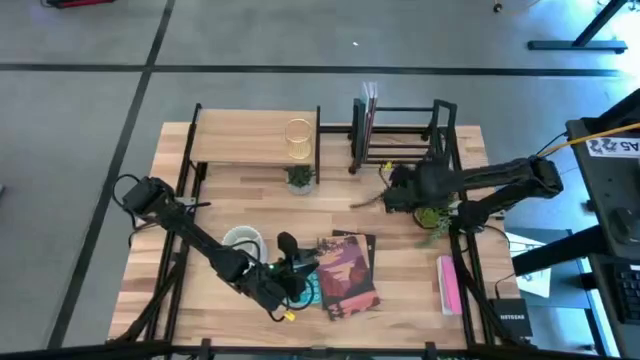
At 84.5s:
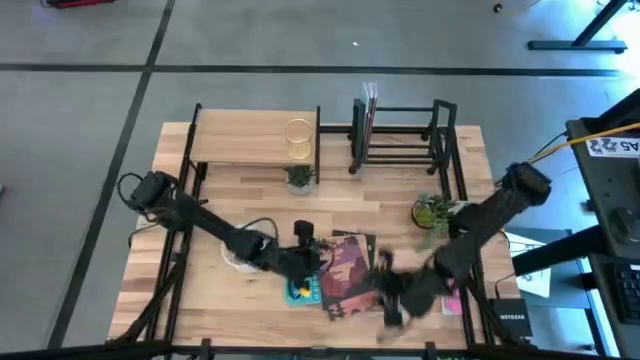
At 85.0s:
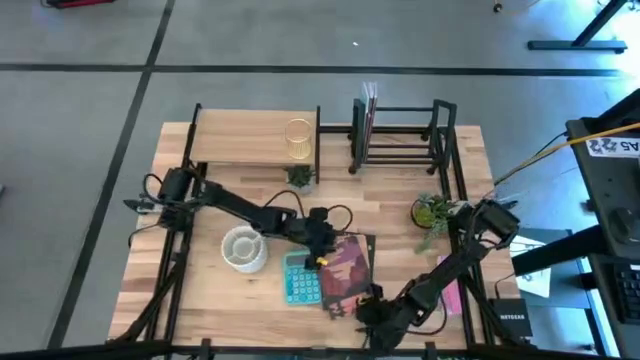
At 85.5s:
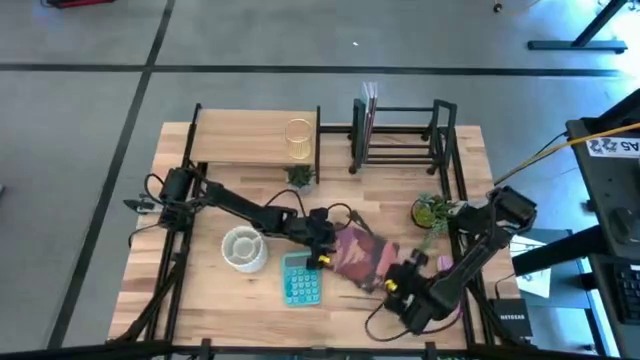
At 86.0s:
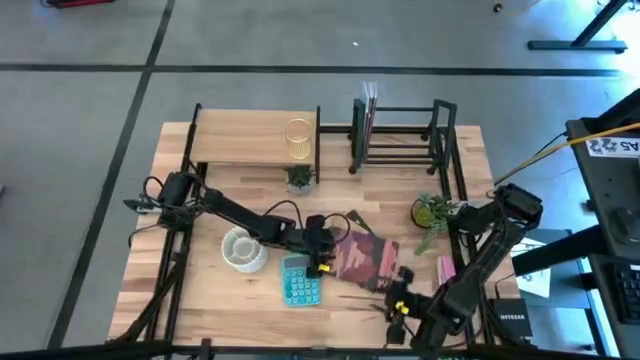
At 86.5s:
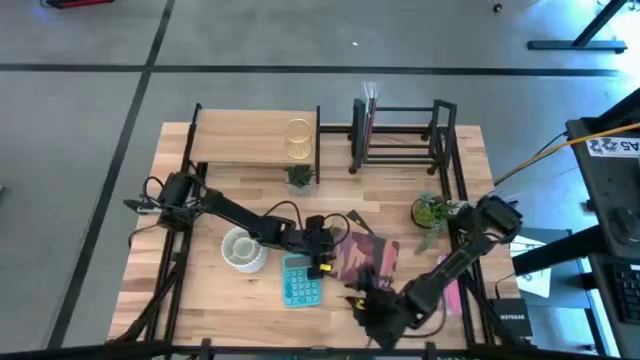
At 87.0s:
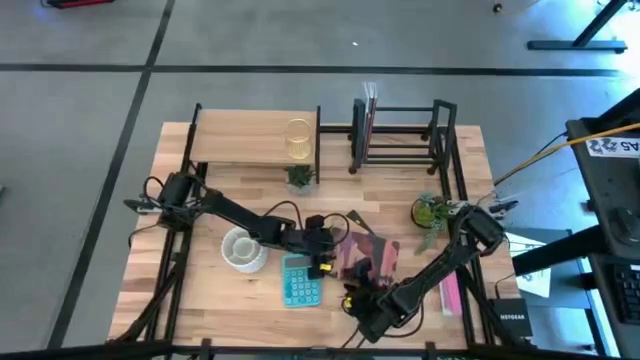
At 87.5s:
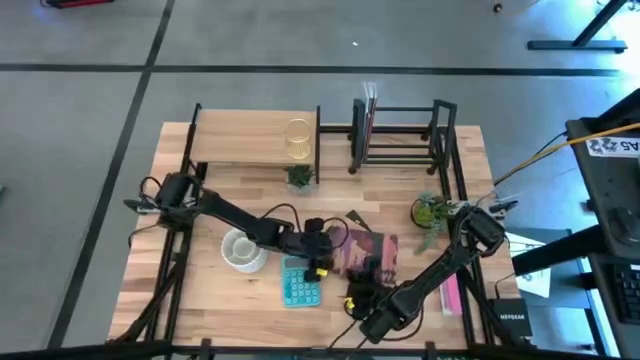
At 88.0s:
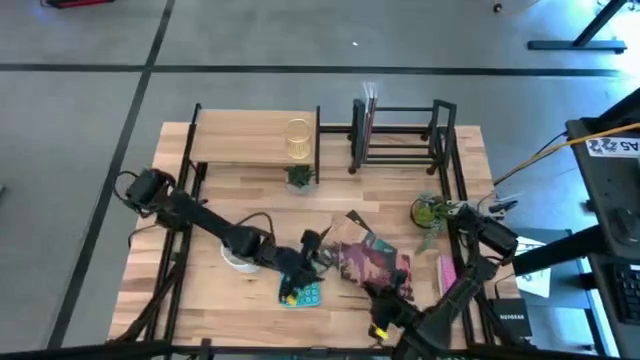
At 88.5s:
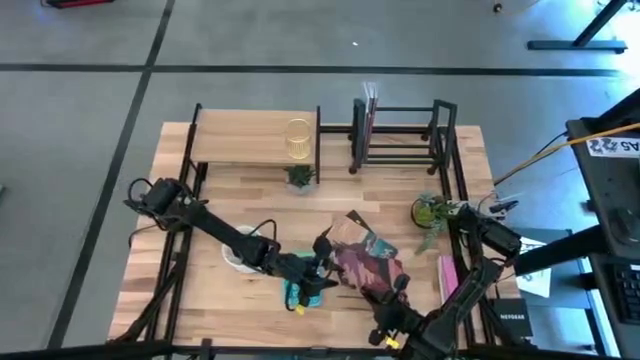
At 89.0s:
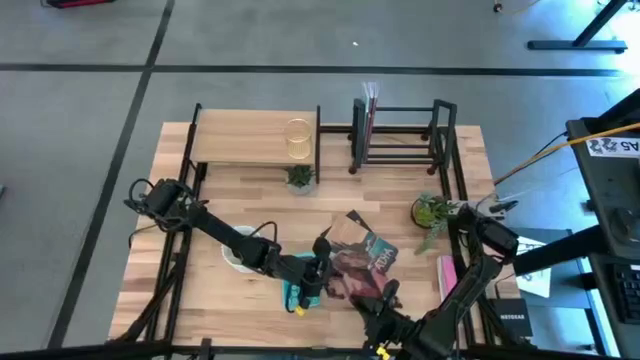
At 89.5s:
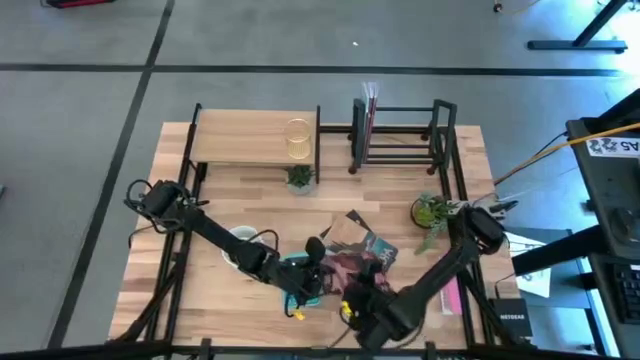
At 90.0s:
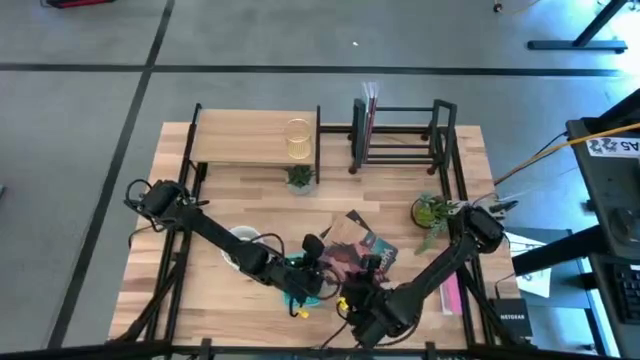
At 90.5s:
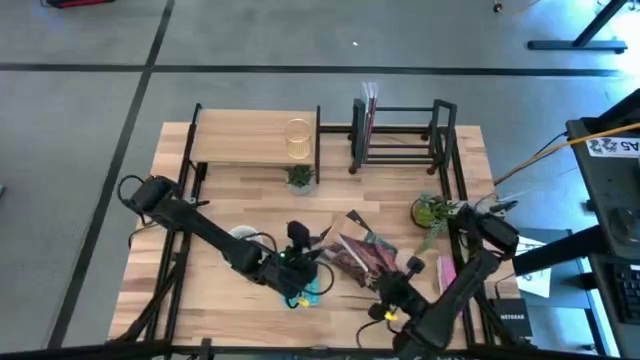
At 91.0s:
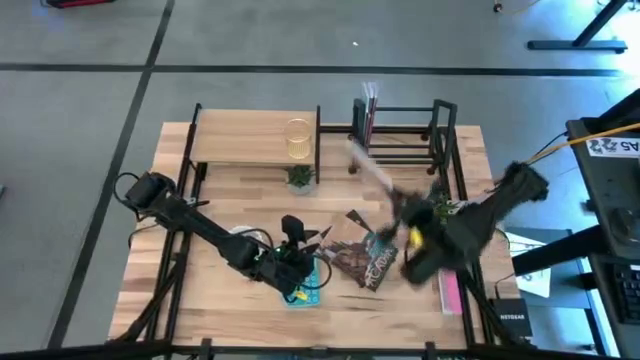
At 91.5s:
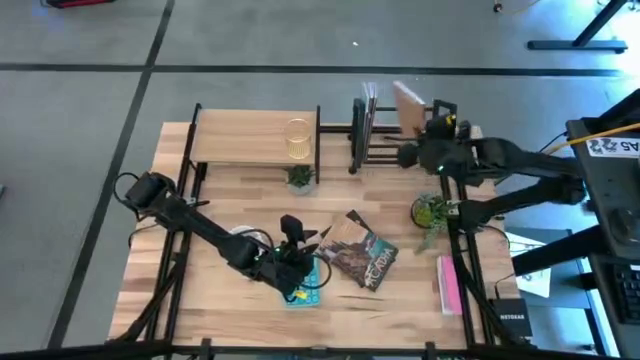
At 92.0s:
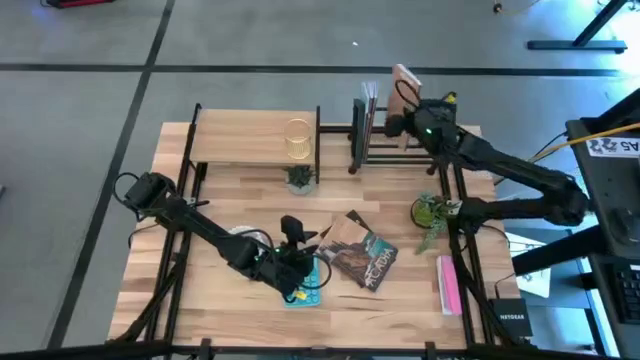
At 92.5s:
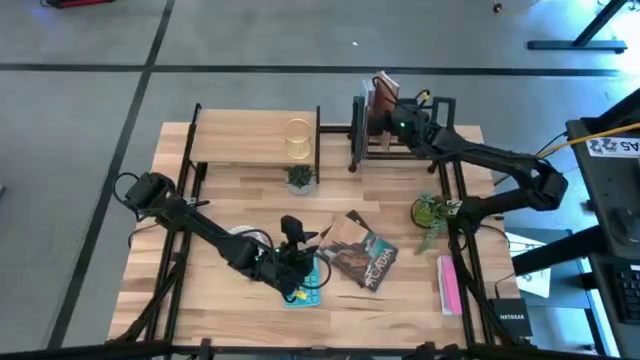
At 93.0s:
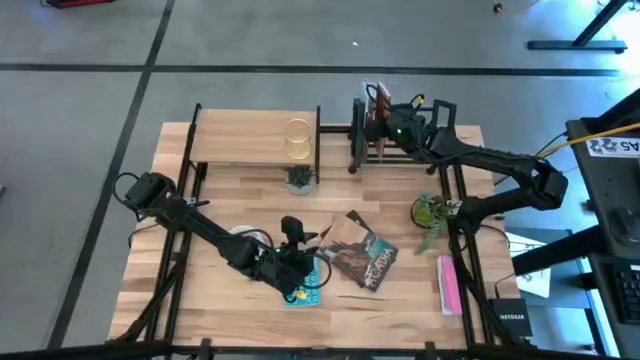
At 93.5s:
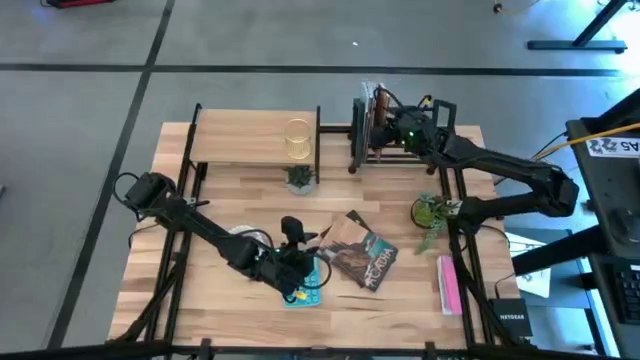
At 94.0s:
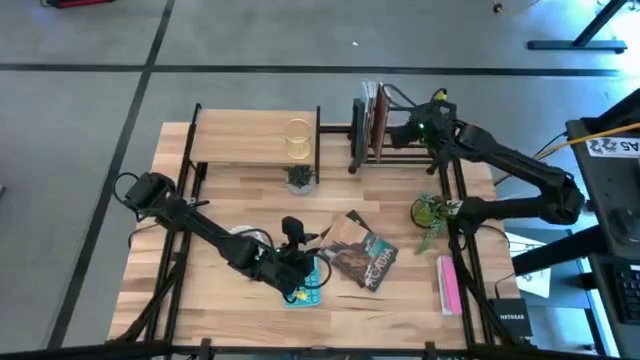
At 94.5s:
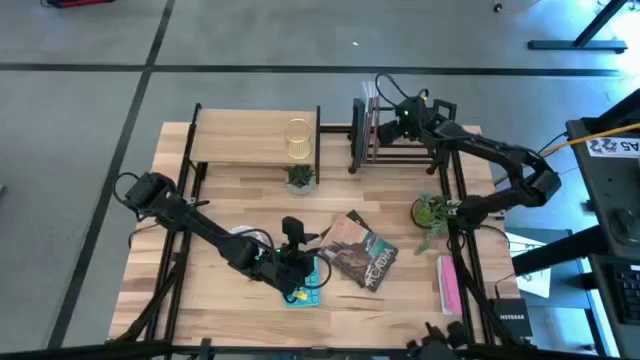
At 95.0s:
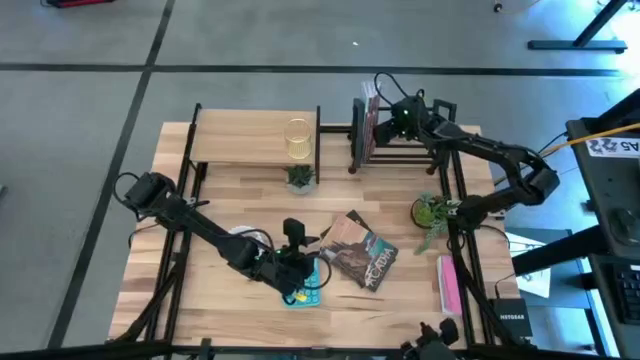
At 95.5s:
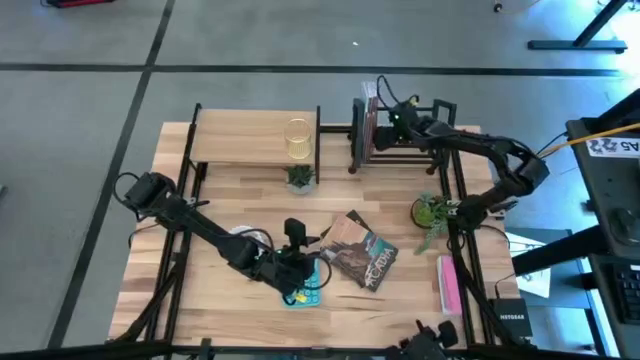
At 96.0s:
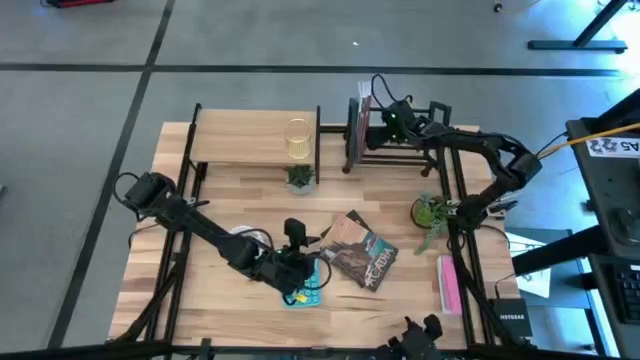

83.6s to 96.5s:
Task: Stock shelves
Put the purple book on the book shelf

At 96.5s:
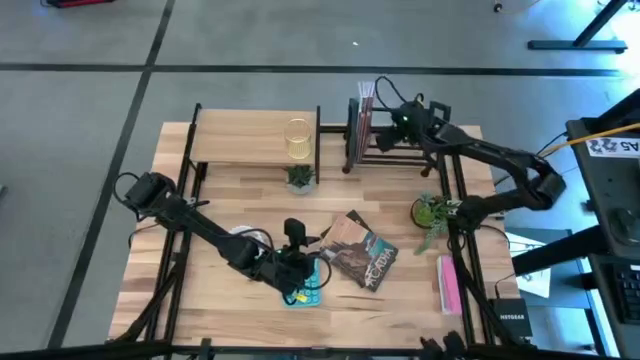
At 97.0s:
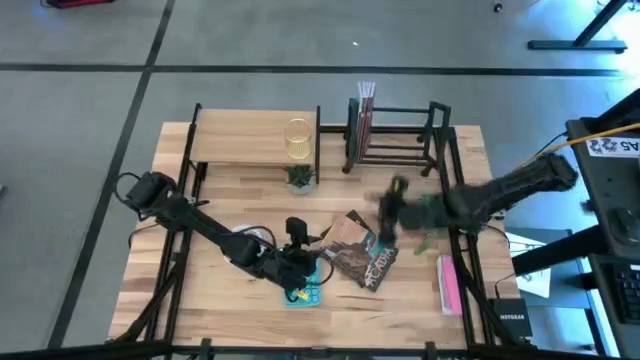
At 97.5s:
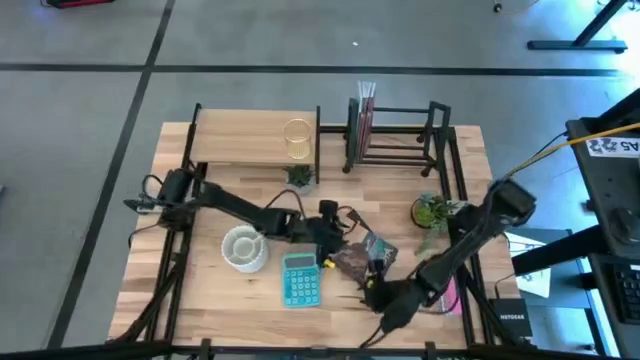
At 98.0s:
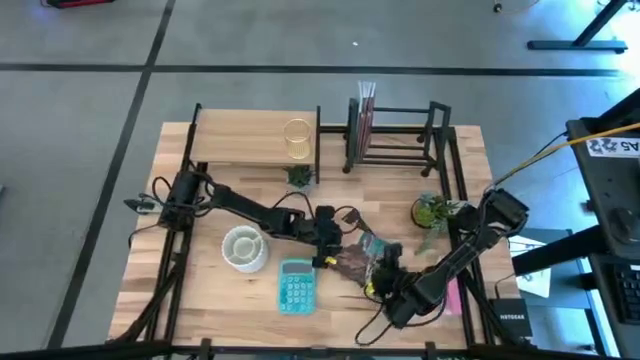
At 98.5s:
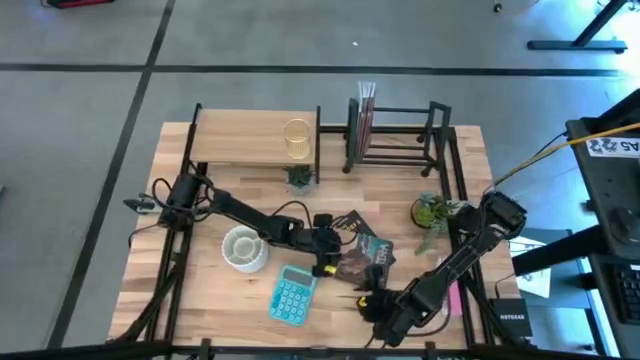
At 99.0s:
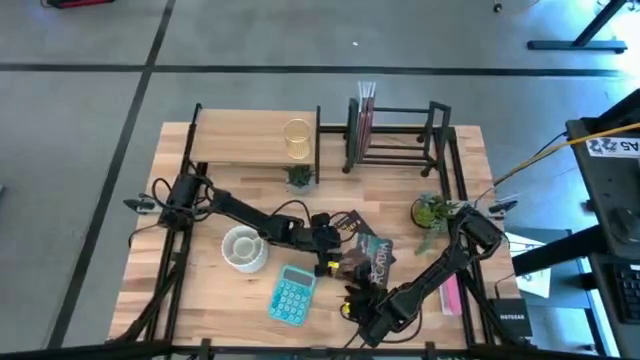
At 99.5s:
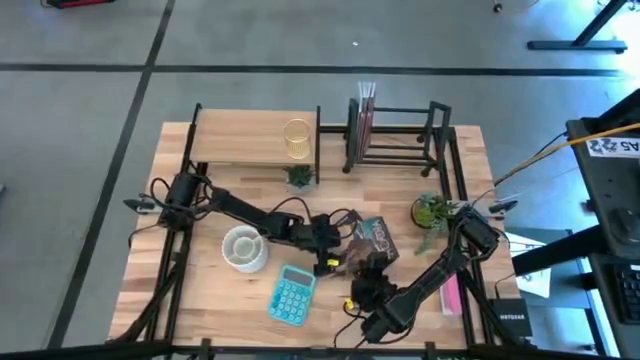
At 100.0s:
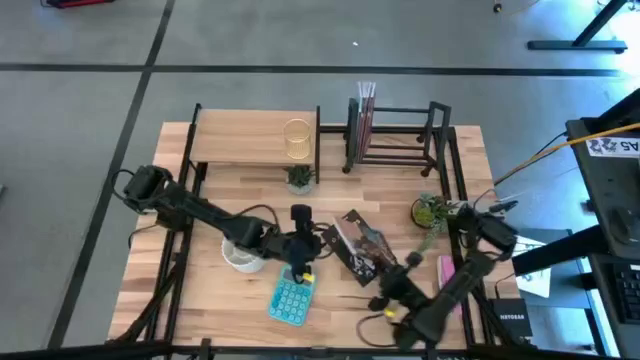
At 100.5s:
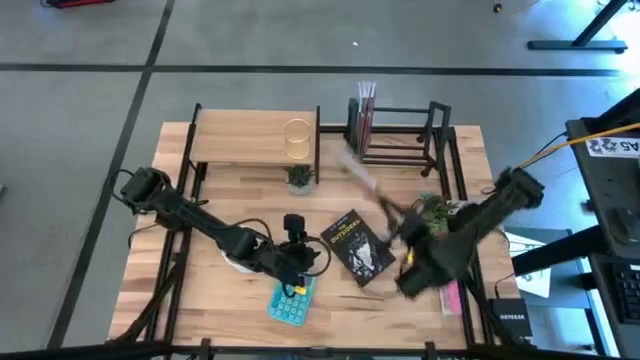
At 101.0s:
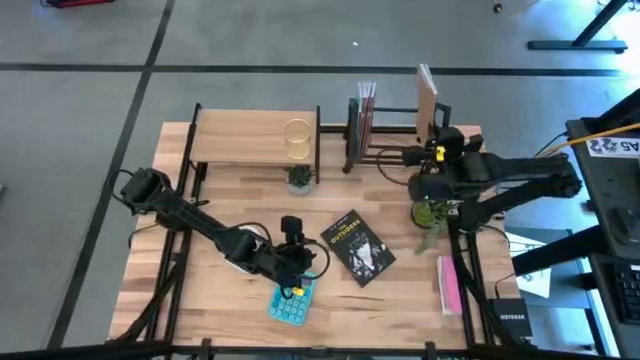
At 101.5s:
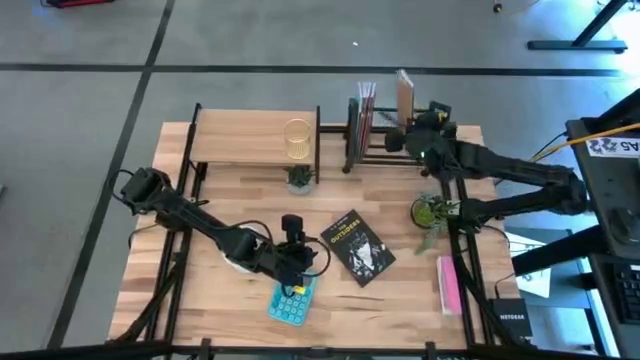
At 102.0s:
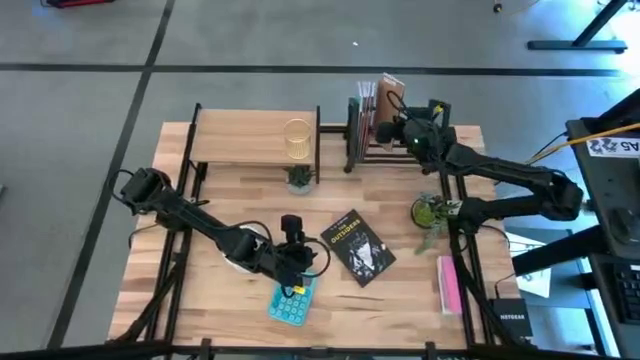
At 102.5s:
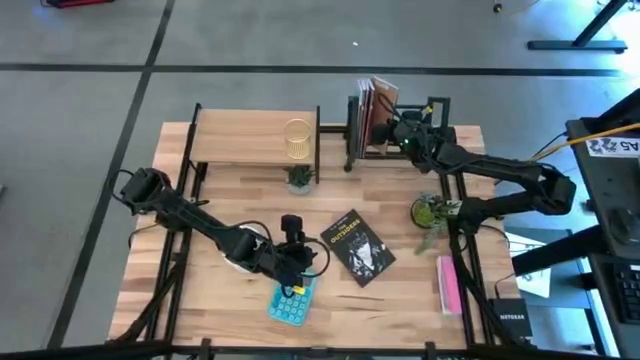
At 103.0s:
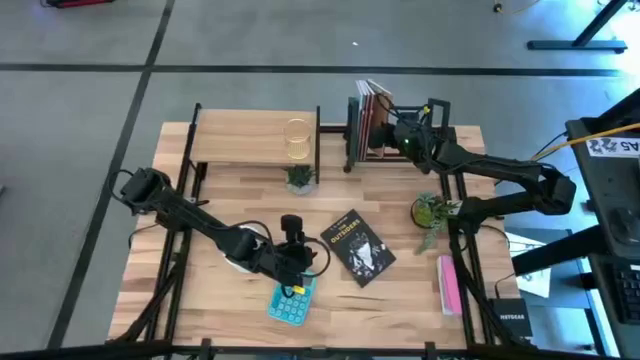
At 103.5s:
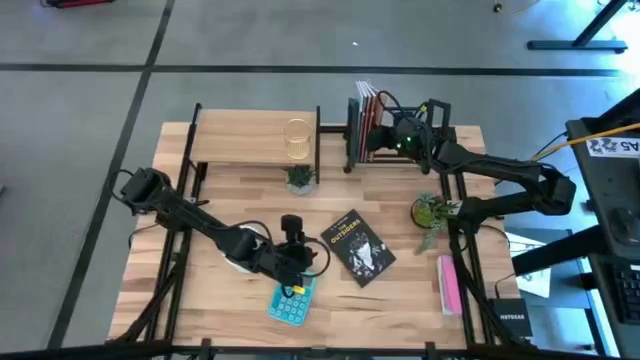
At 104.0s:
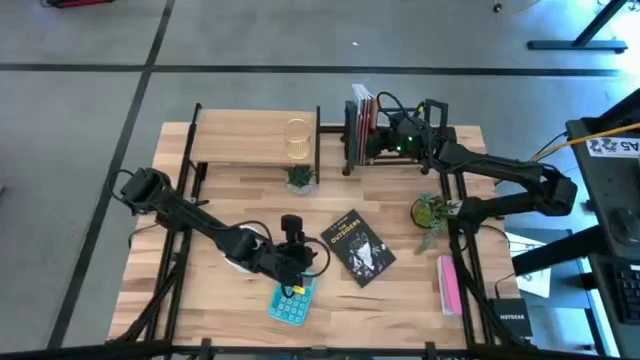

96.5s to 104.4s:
Put the brown book on the book shelf

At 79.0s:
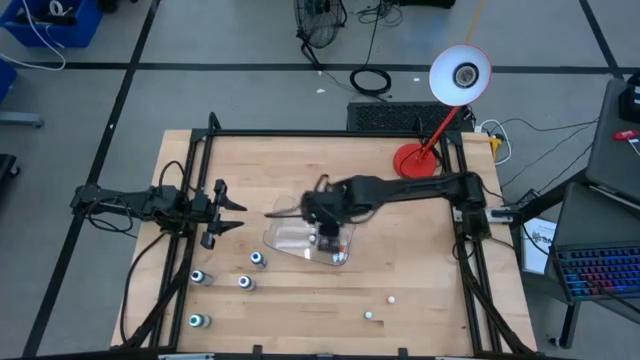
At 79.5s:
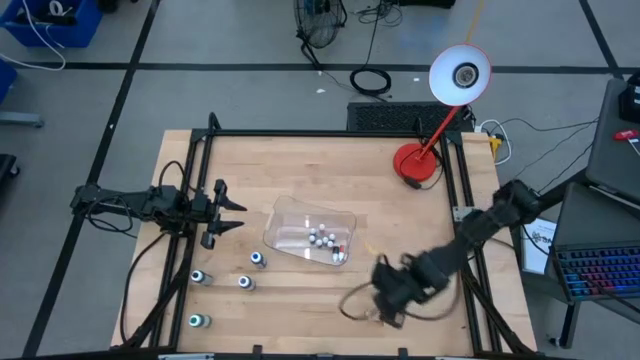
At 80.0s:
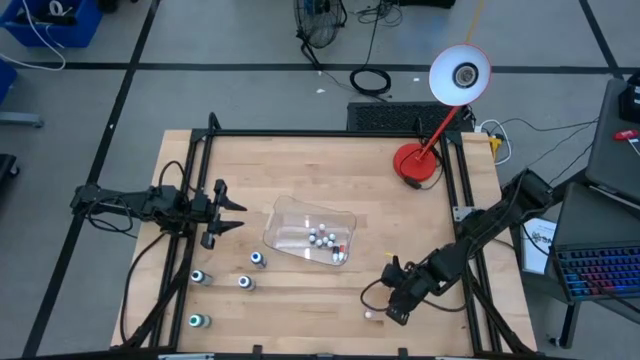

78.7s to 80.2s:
Task: Pick & Place food coloring
Put the small orange food coloring bottle into the transparent bin
